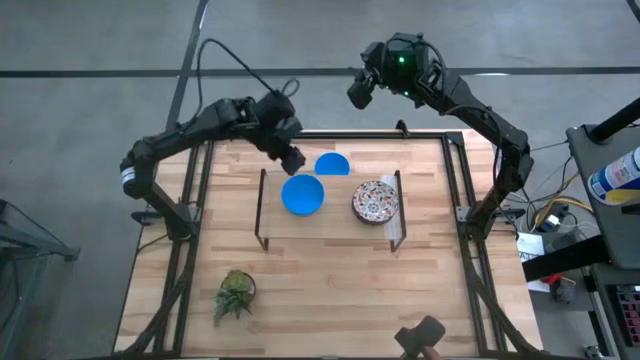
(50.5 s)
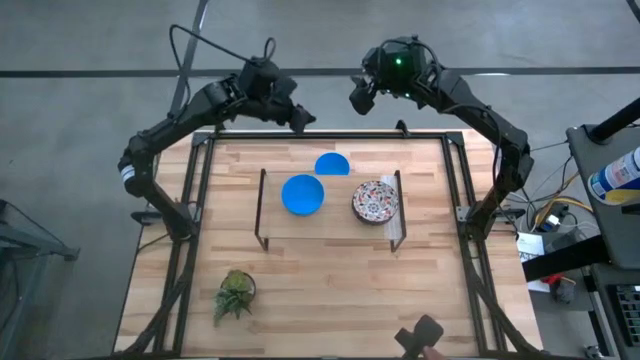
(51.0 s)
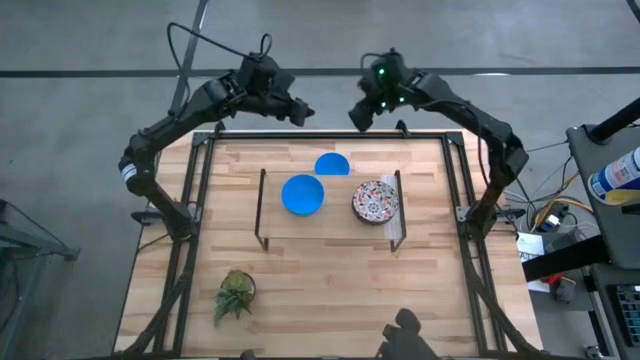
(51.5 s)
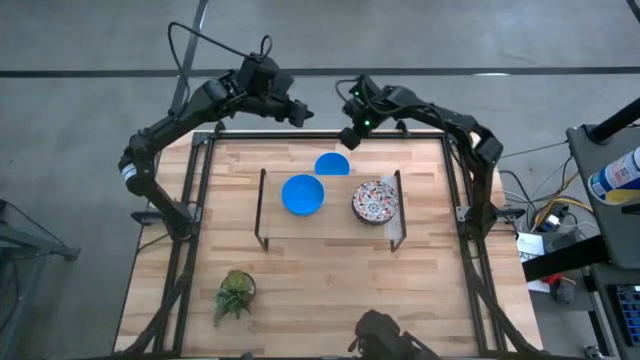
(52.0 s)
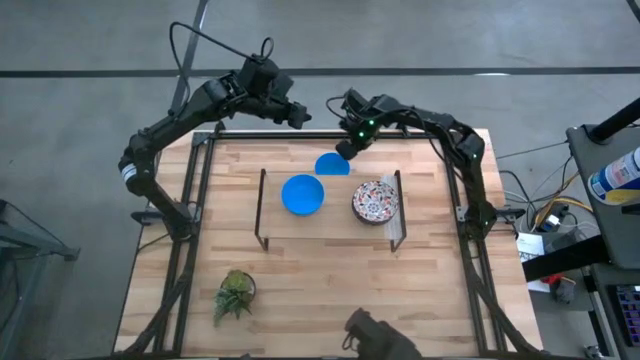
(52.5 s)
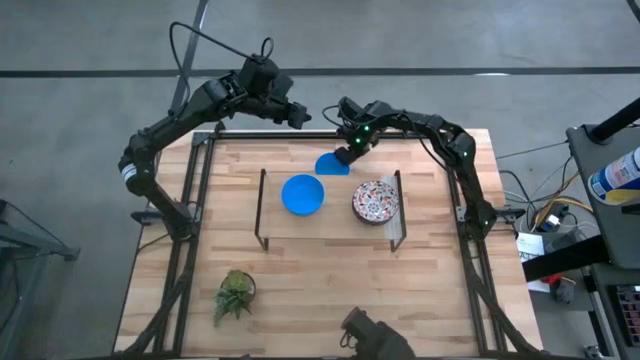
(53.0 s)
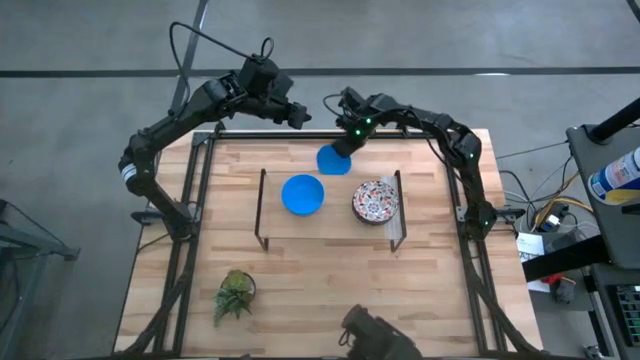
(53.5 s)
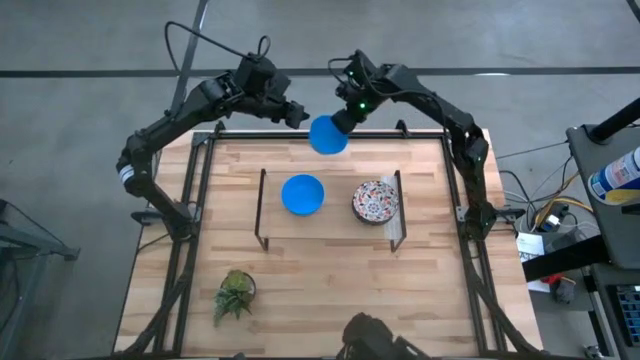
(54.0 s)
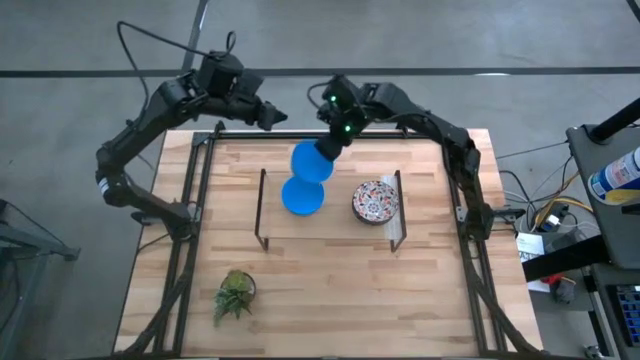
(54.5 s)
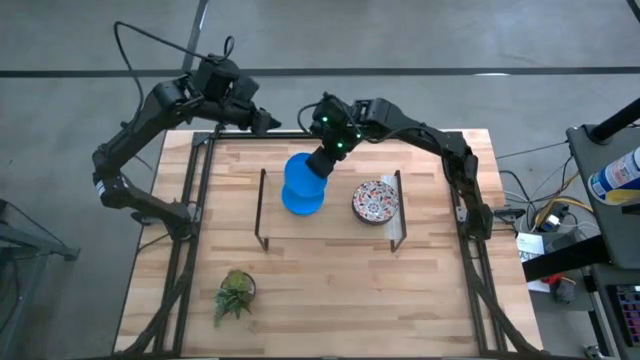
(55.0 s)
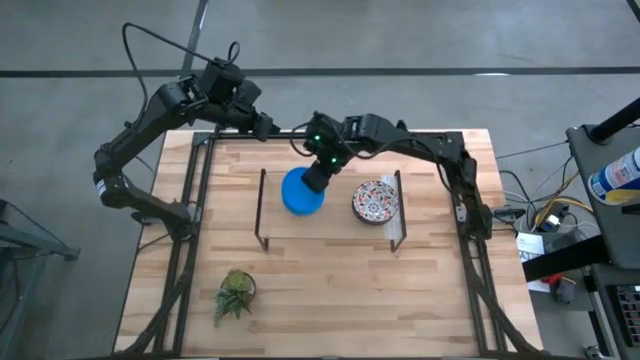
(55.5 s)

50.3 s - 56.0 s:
Task: Pick & Place Mini bowls
Stack the blue bowl on top of the blue bowl on the shelf

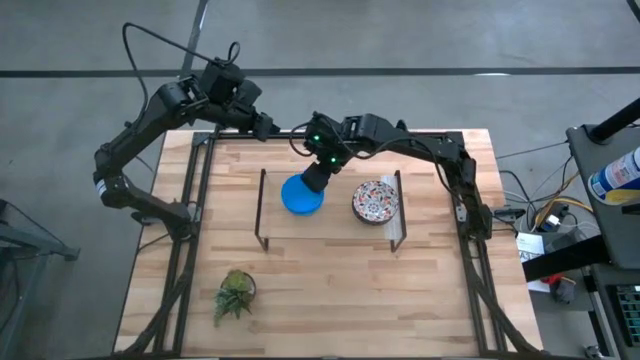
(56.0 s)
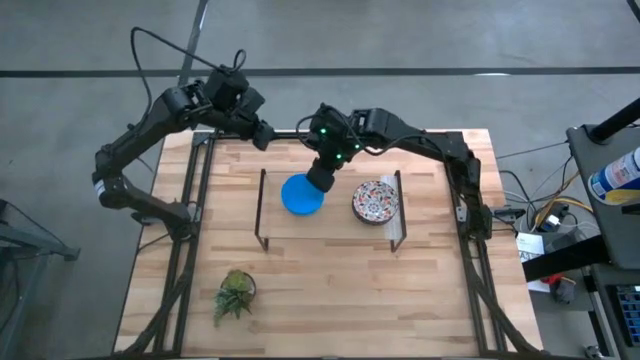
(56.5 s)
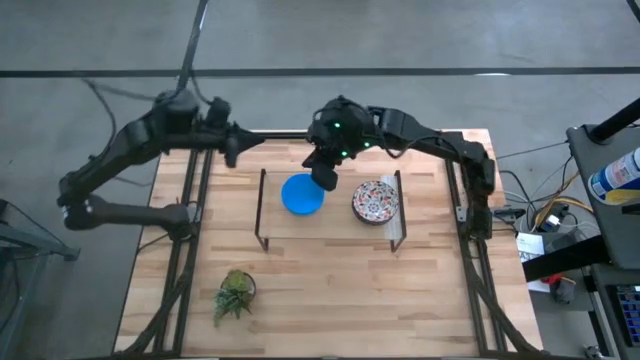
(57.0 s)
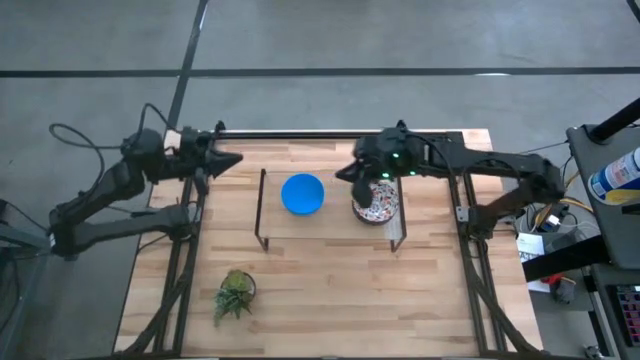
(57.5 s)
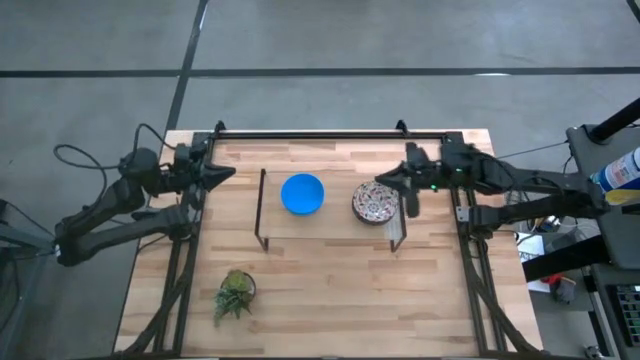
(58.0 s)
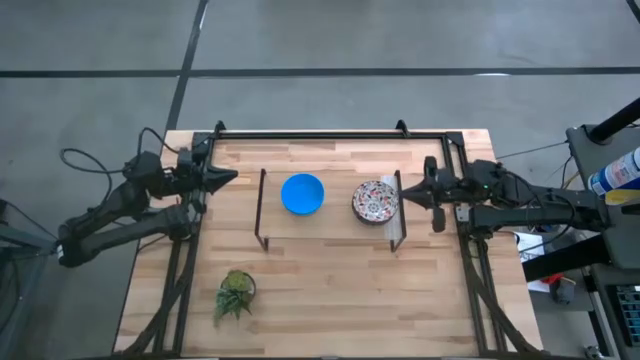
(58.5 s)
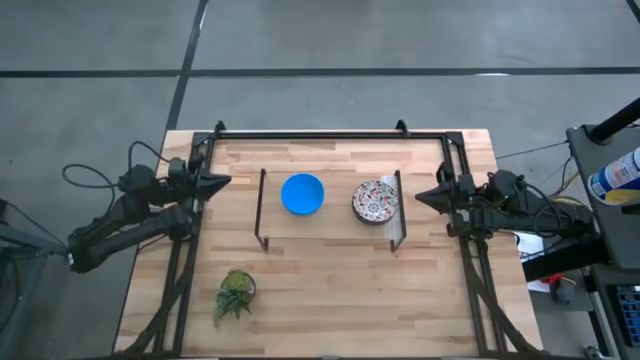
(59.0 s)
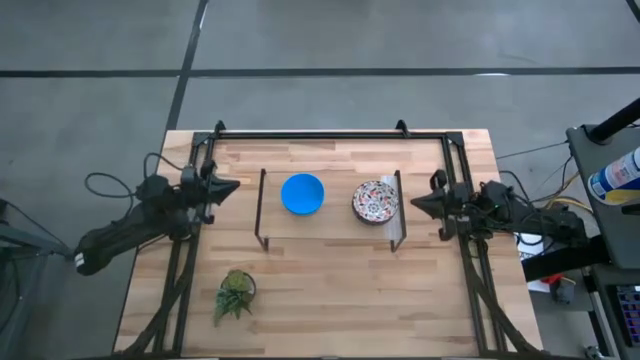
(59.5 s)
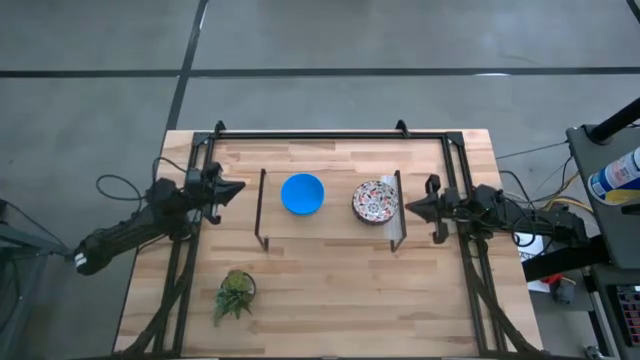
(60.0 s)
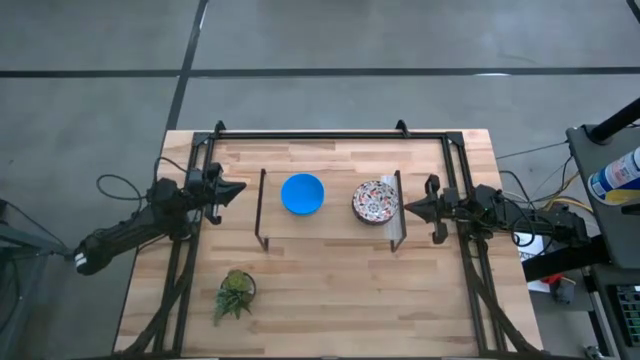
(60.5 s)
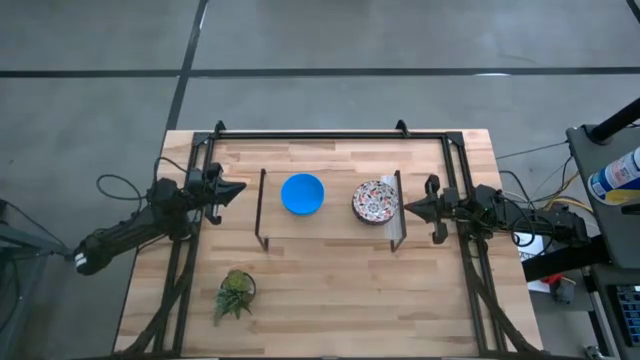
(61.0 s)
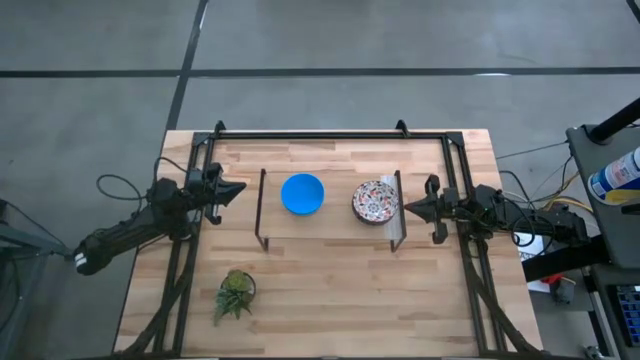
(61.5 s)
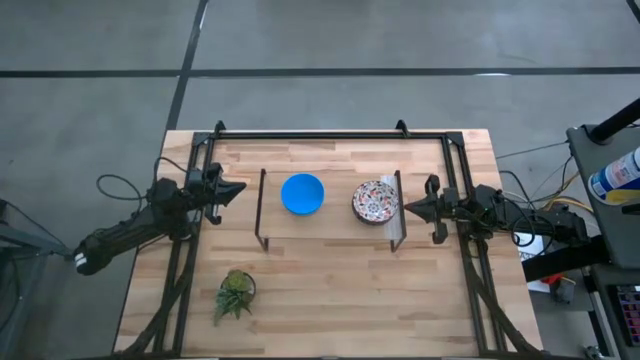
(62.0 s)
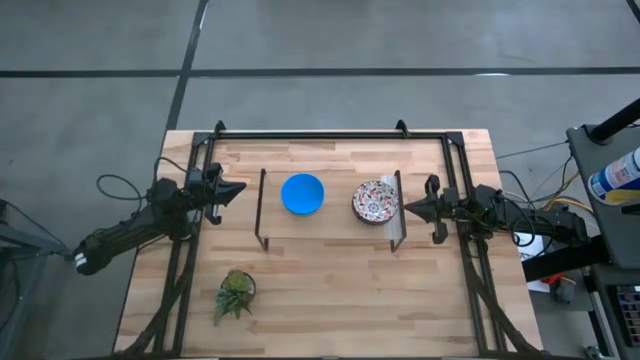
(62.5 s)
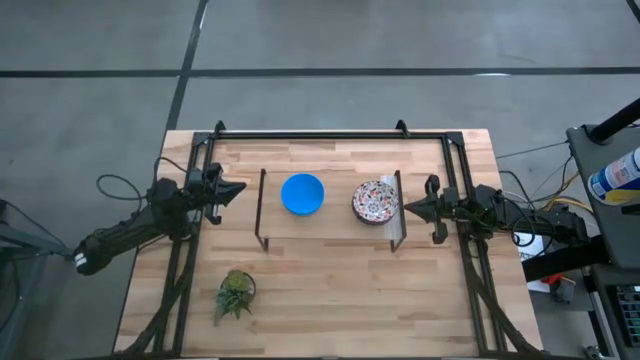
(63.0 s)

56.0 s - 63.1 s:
Return to Home Position

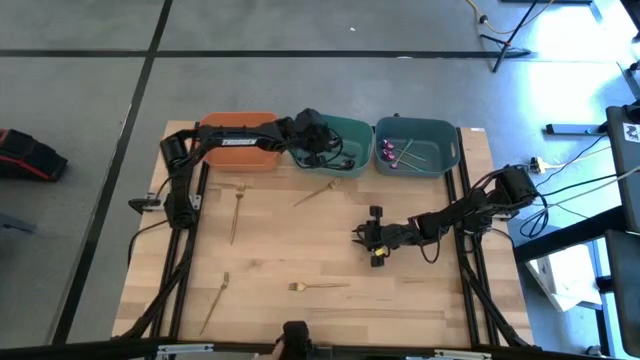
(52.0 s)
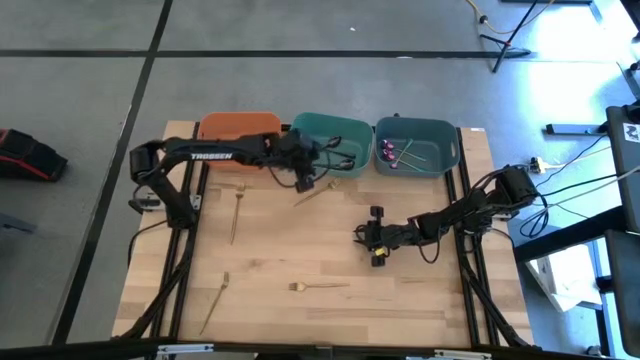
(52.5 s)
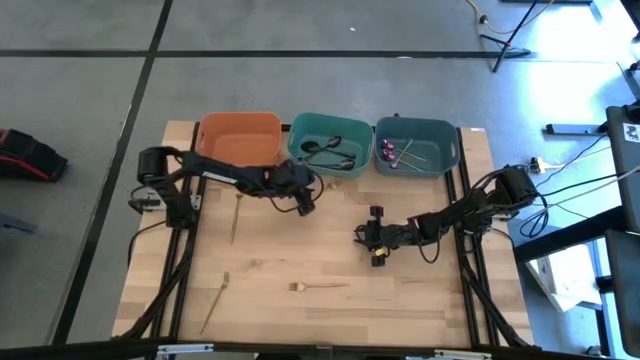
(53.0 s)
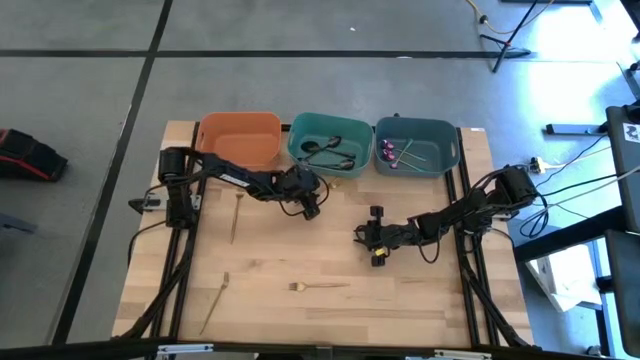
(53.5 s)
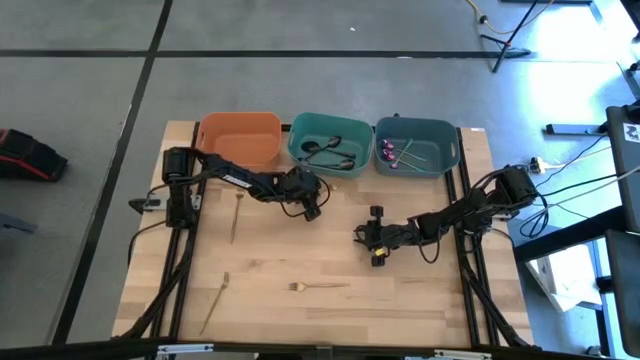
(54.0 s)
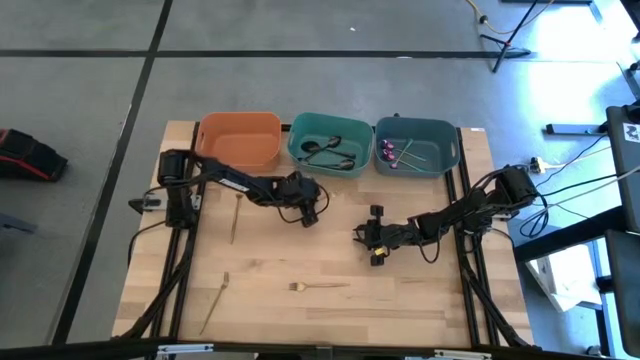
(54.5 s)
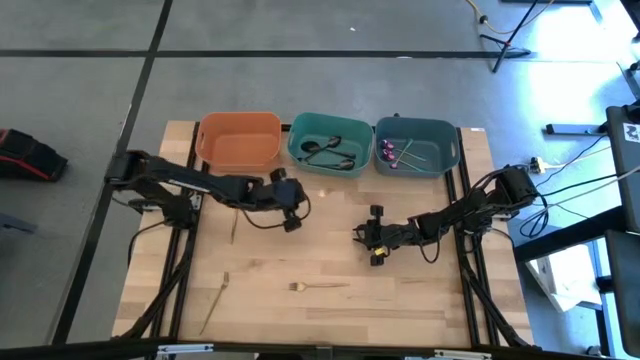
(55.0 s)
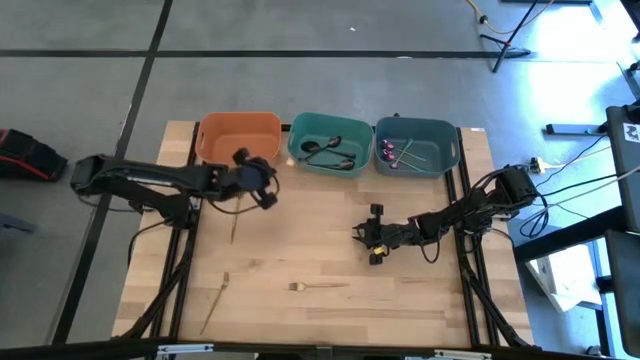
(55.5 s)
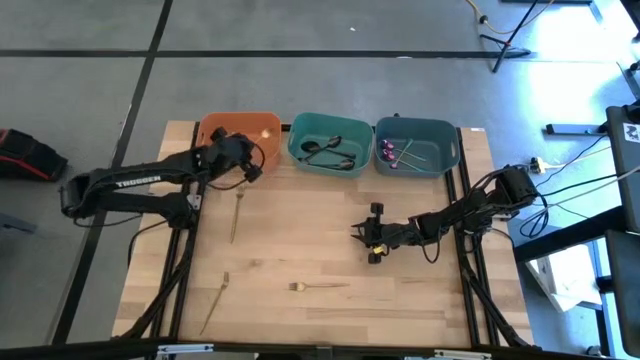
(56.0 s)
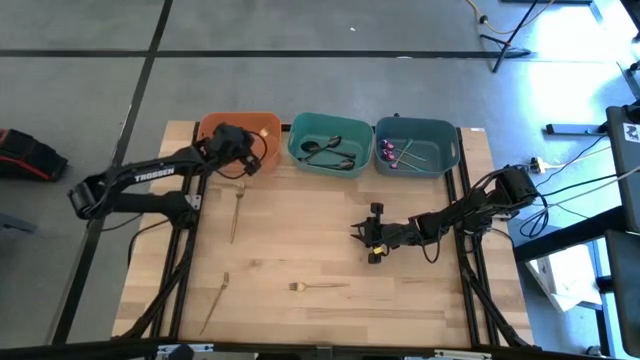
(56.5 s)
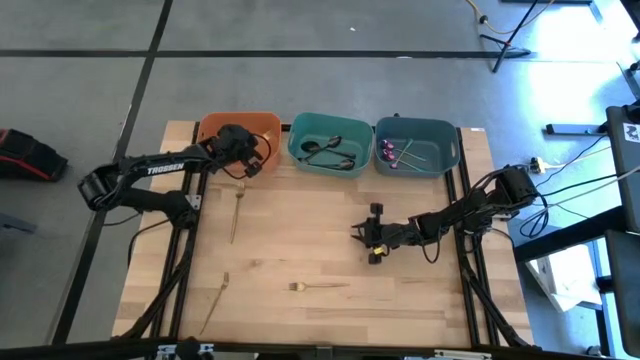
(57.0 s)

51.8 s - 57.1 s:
Task: Sort silverware by color (type)
Put the gold fork into the orange bin

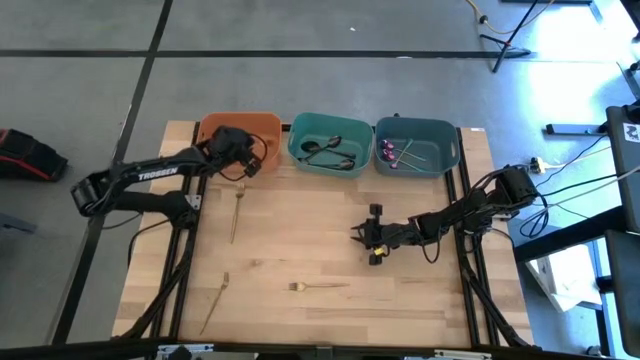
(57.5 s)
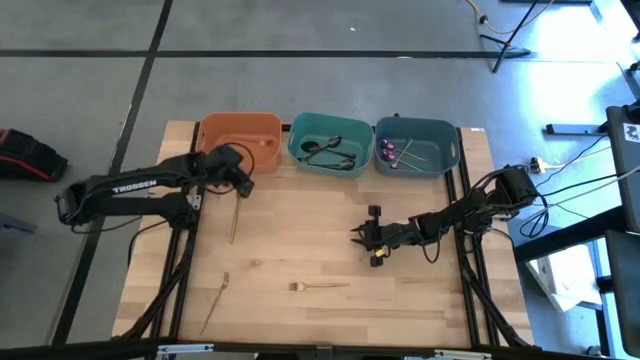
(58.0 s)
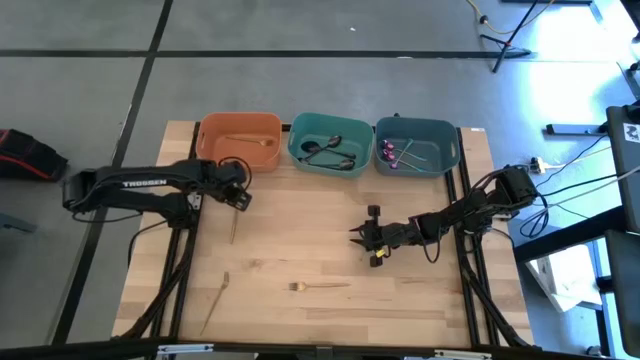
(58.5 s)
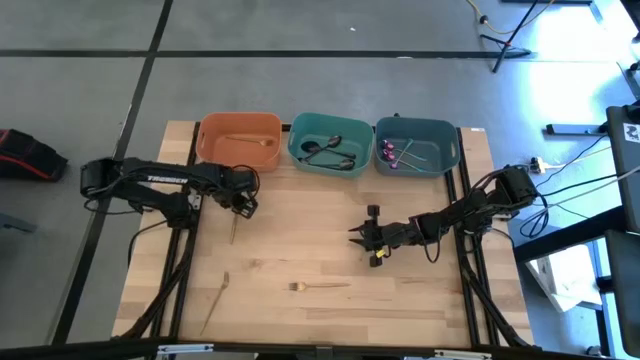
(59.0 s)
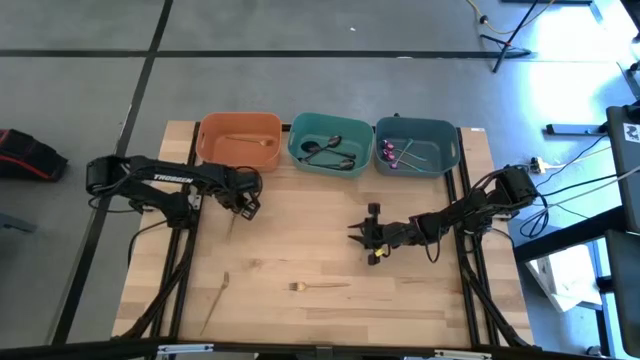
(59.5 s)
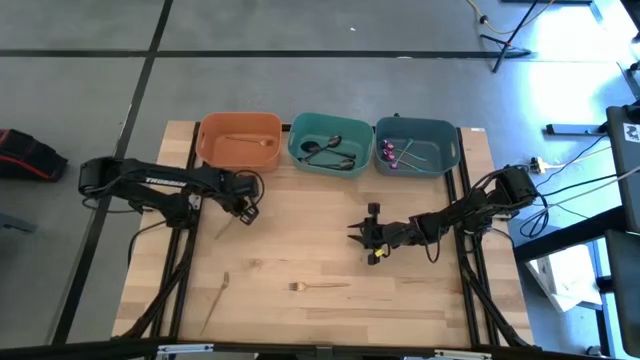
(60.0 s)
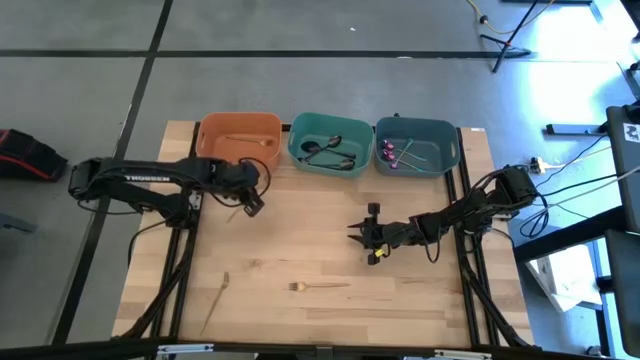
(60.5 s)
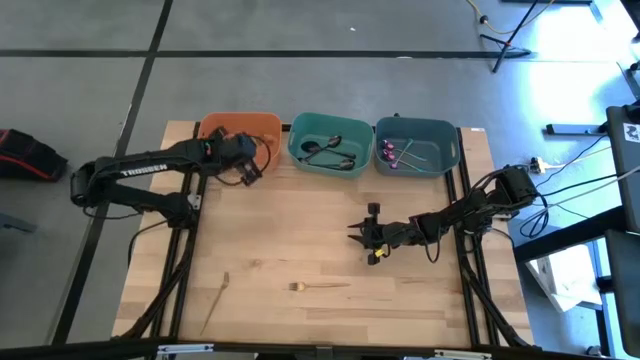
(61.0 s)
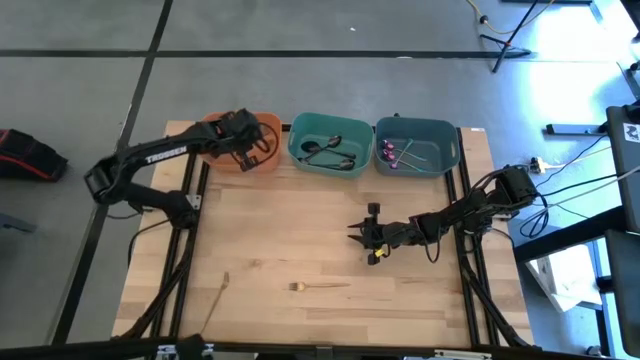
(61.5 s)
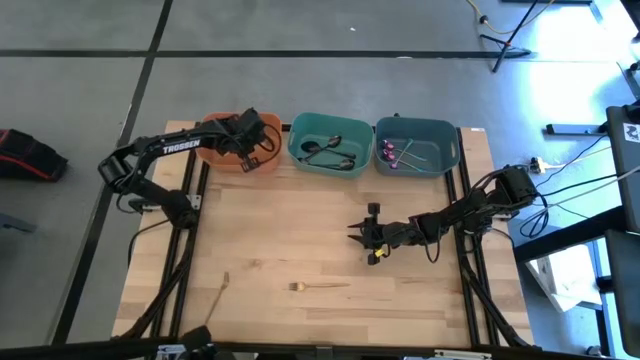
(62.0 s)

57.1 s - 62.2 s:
Put the gold fork into the orange bin
